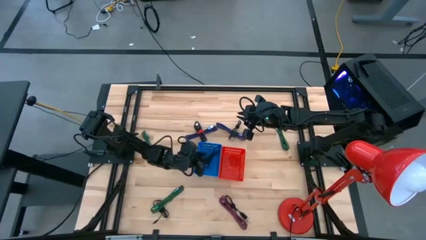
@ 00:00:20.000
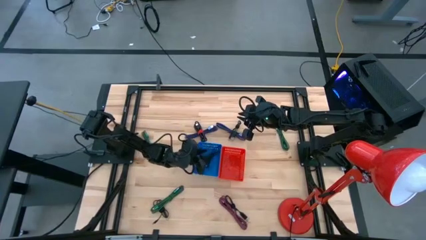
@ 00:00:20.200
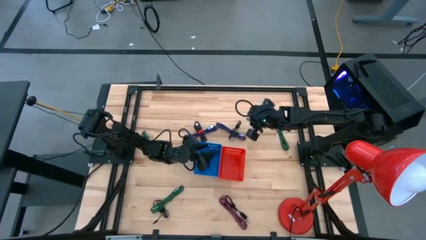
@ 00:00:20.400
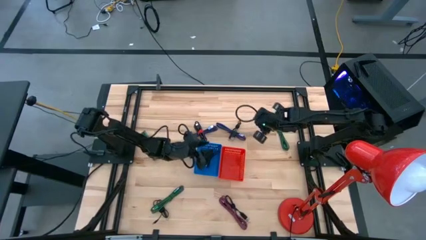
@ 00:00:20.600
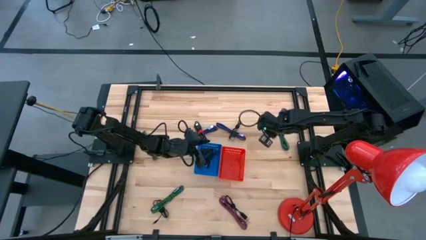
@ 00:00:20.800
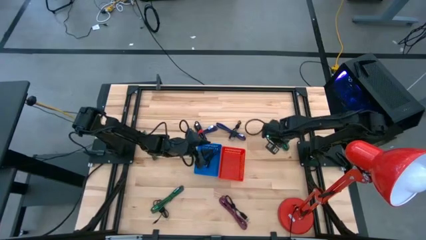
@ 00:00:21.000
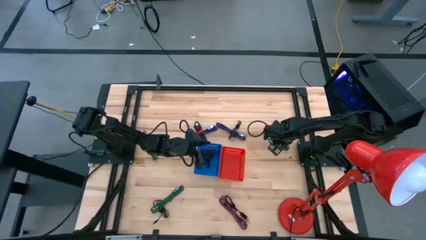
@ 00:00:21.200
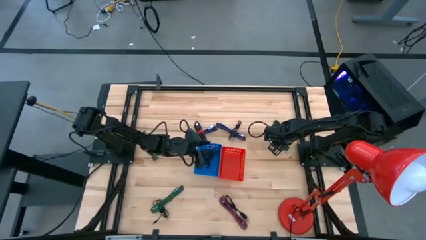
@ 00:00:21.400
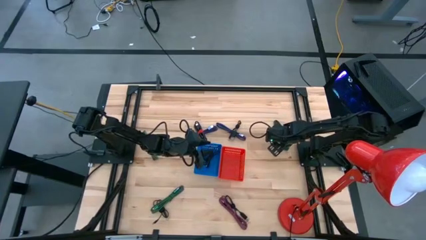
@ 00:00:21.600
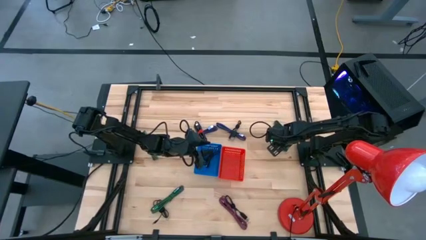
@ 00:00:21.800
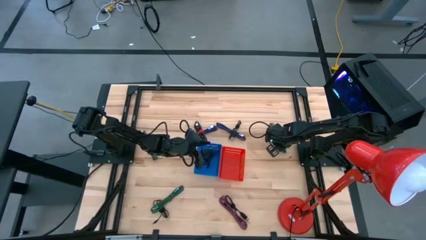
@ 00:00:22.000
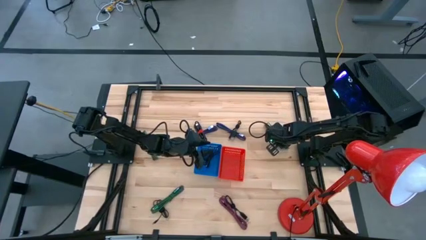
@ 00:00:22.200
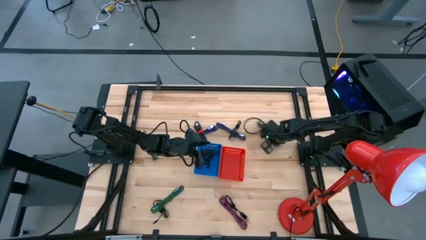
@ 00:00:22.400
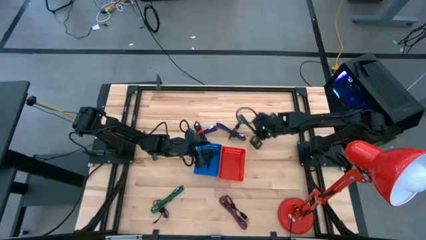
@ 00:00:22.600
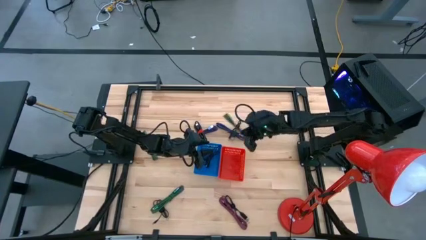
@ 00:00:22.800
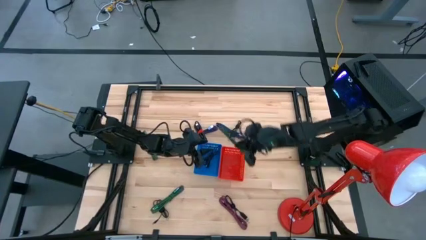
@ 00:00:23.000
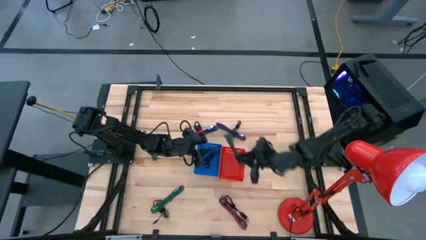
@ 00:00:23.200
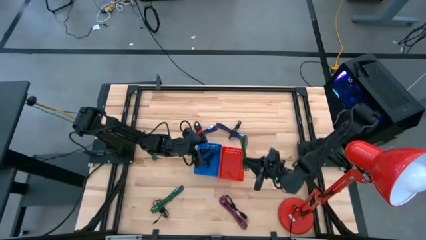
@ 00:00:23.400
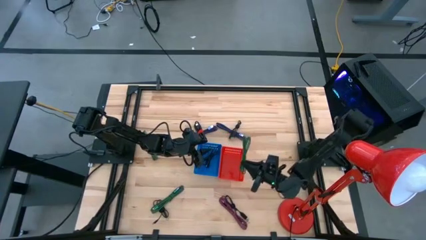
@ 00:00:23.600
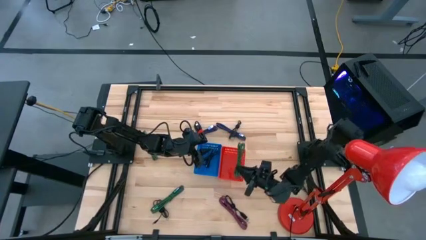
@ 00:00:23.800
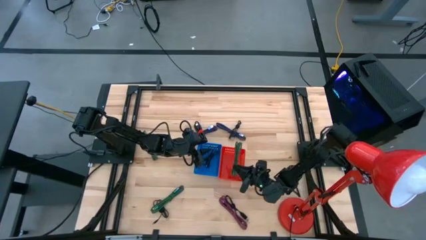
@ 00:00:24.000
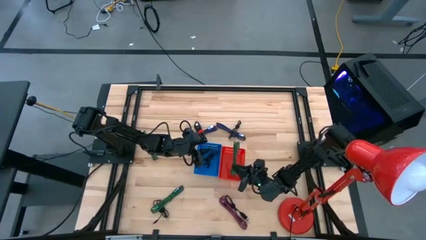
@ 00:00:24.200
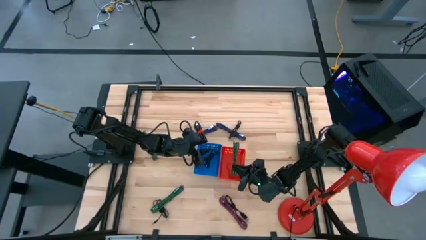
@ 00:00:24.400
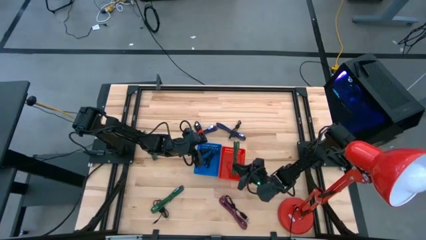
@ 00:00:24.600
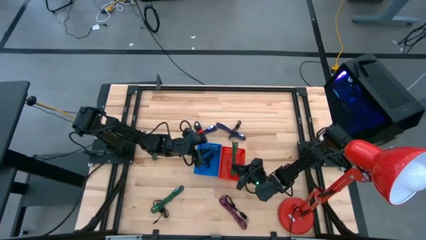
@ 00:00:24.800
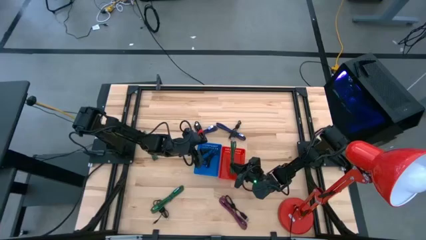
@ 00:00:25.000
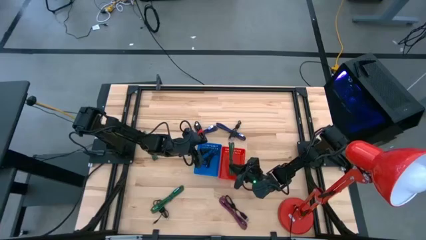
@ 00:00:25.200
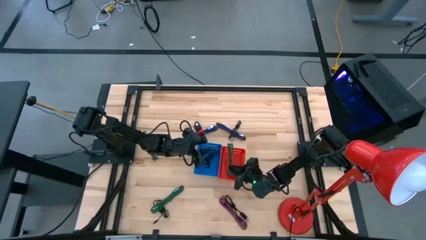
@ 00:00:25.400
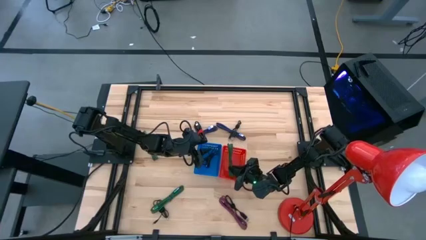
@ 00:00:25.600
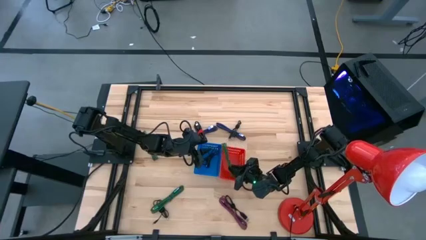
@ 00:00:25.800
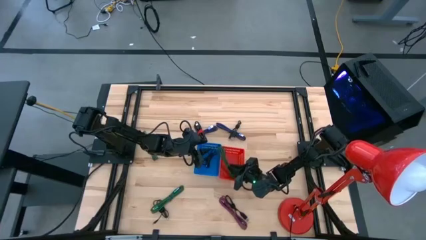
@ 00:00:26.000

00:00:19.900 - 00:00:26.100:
Task: Pick & Place USB Port
Put the black and green USB cable into the red basket

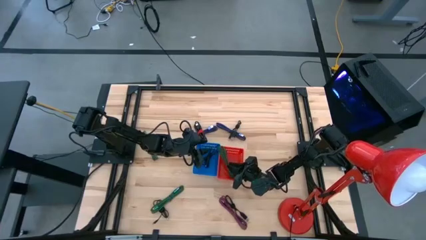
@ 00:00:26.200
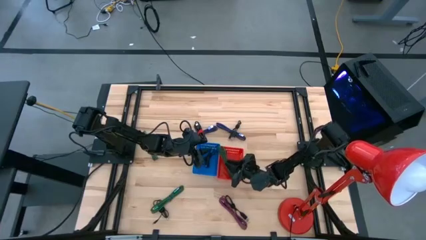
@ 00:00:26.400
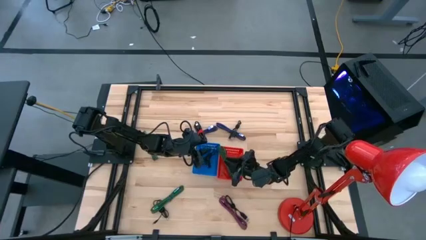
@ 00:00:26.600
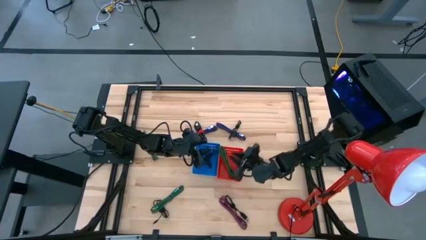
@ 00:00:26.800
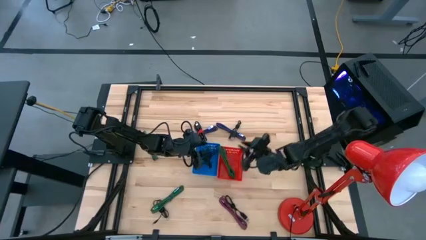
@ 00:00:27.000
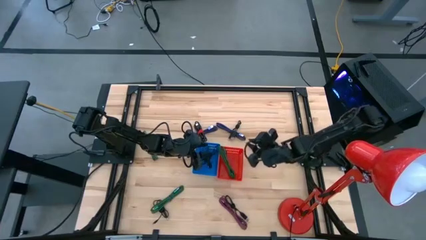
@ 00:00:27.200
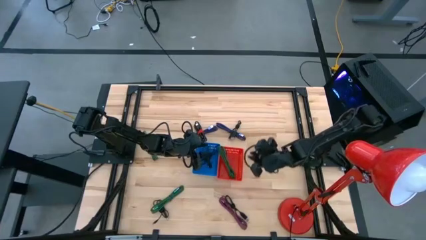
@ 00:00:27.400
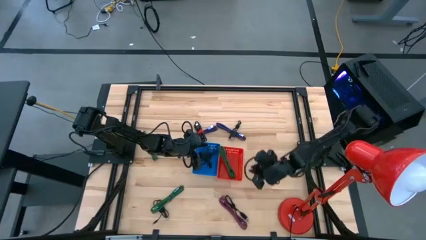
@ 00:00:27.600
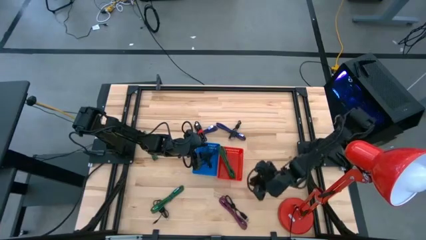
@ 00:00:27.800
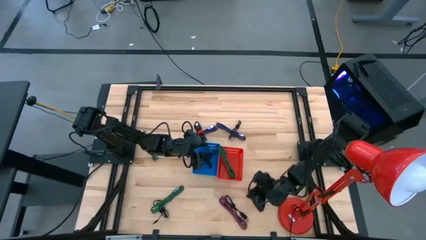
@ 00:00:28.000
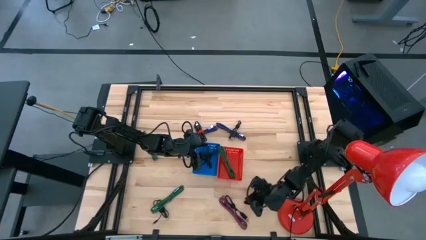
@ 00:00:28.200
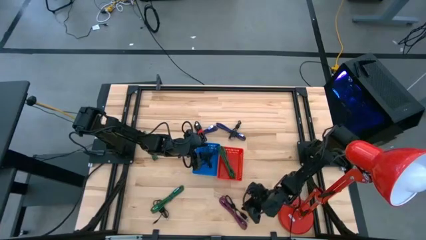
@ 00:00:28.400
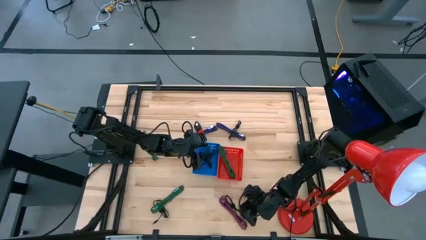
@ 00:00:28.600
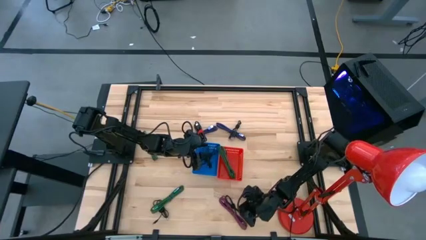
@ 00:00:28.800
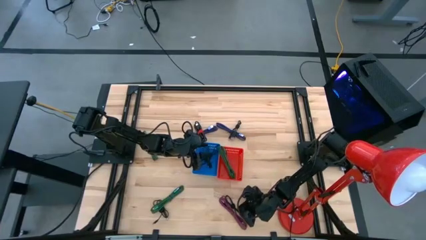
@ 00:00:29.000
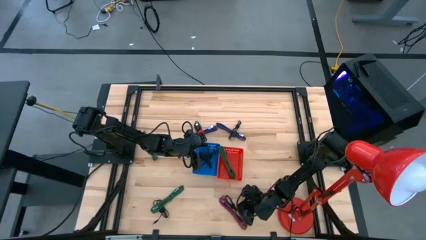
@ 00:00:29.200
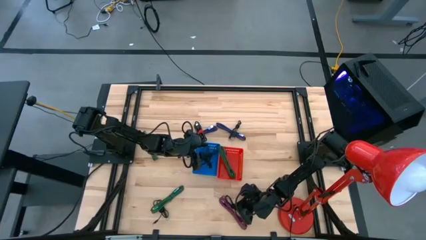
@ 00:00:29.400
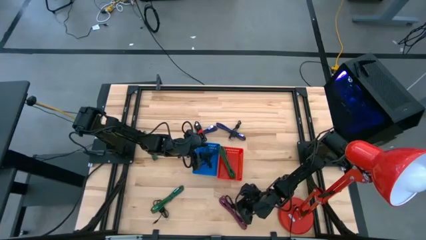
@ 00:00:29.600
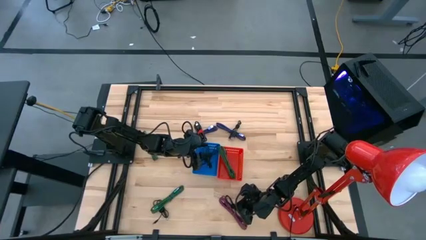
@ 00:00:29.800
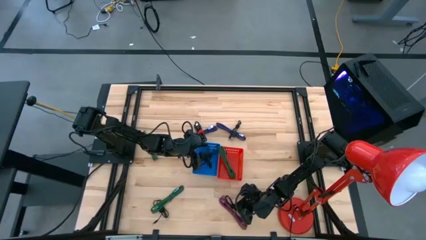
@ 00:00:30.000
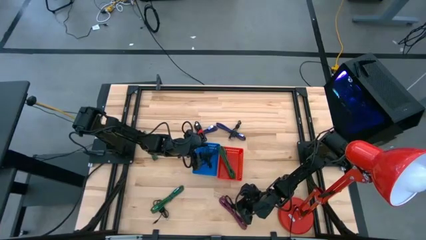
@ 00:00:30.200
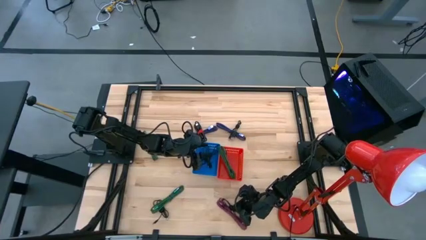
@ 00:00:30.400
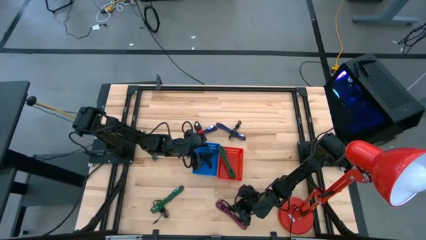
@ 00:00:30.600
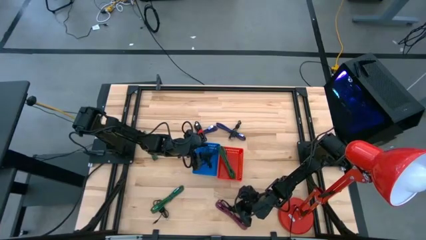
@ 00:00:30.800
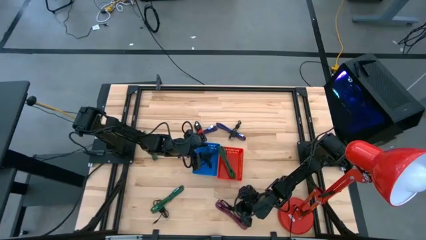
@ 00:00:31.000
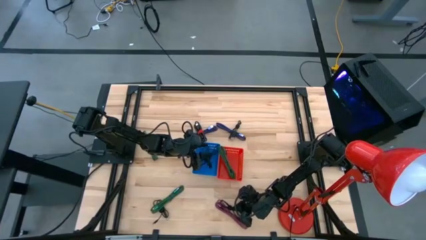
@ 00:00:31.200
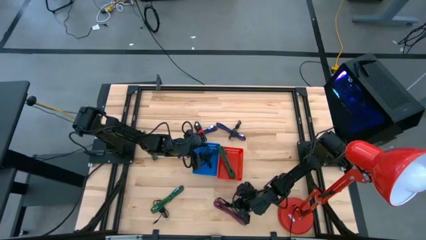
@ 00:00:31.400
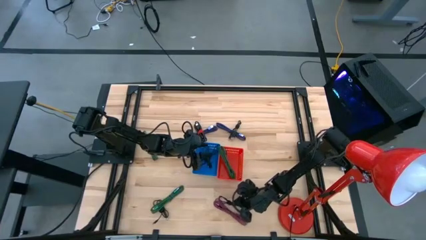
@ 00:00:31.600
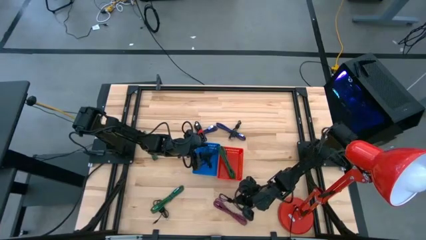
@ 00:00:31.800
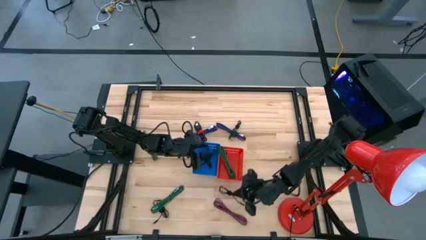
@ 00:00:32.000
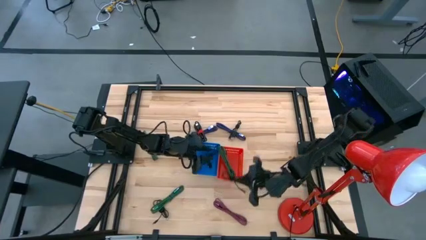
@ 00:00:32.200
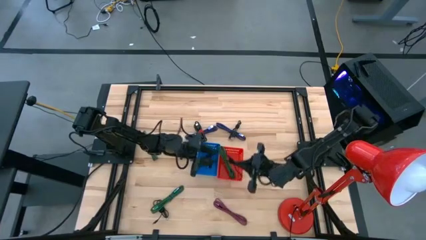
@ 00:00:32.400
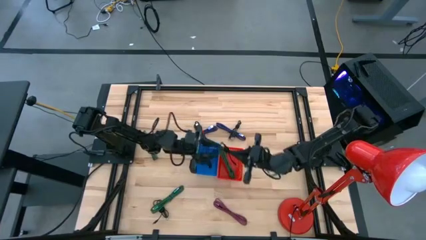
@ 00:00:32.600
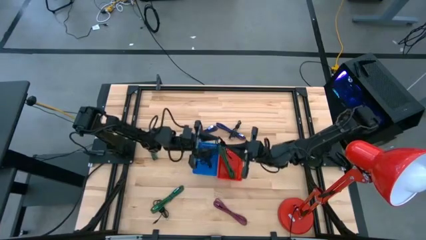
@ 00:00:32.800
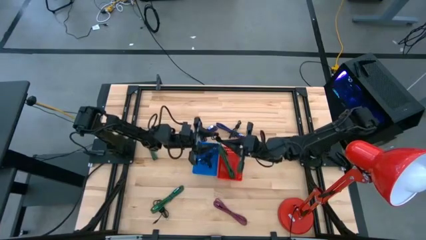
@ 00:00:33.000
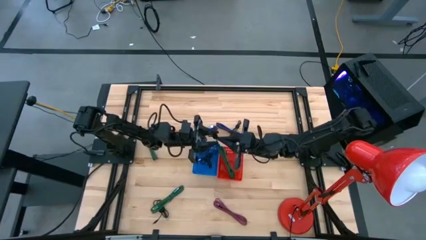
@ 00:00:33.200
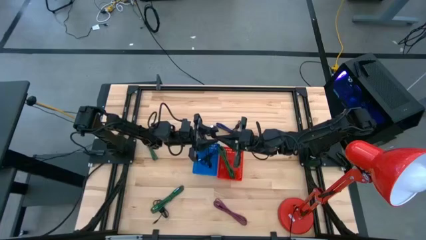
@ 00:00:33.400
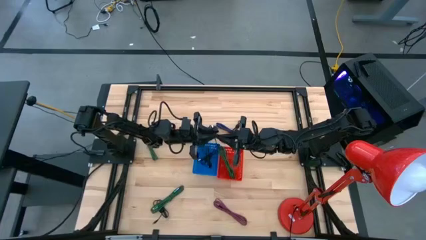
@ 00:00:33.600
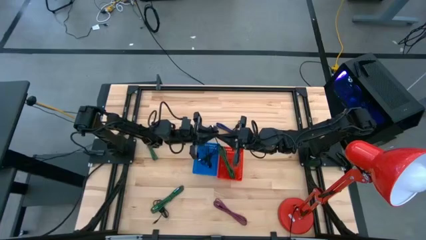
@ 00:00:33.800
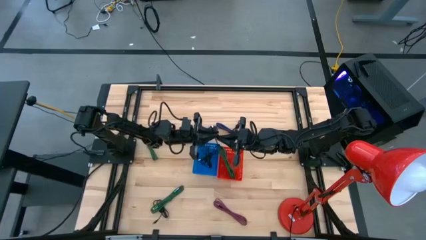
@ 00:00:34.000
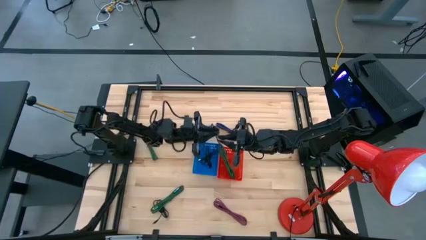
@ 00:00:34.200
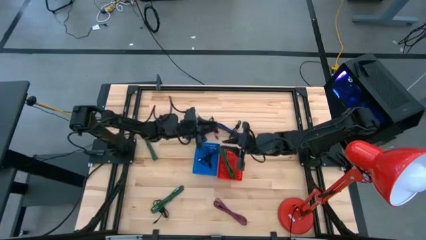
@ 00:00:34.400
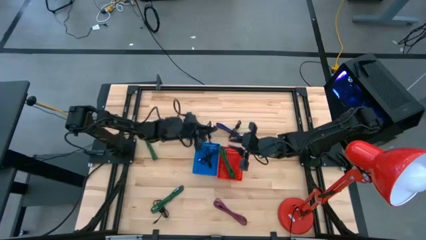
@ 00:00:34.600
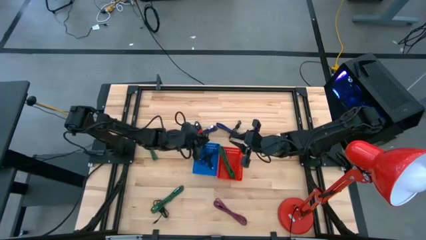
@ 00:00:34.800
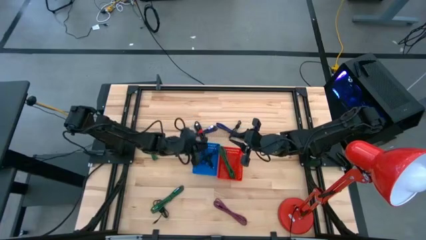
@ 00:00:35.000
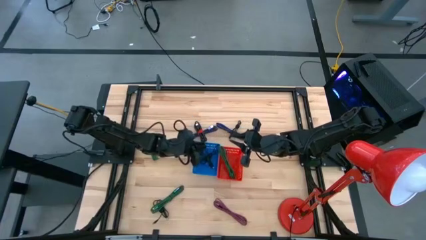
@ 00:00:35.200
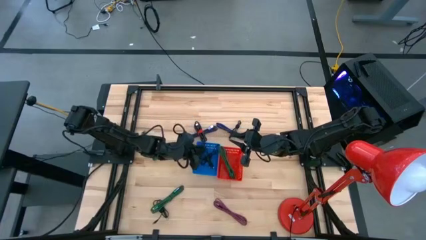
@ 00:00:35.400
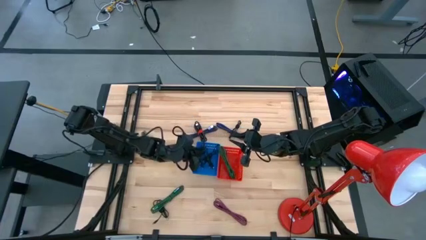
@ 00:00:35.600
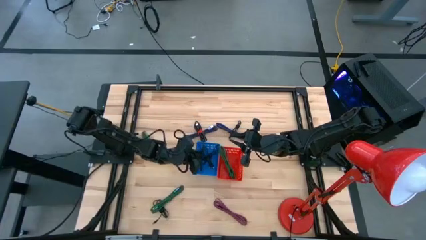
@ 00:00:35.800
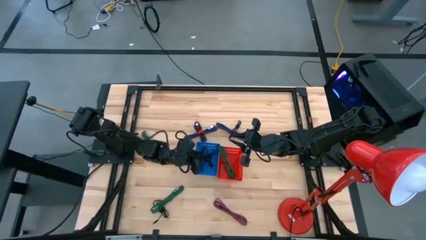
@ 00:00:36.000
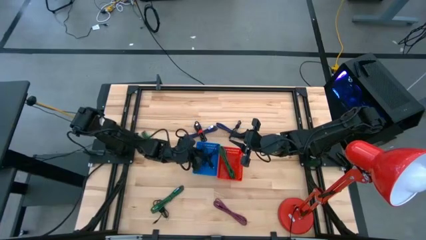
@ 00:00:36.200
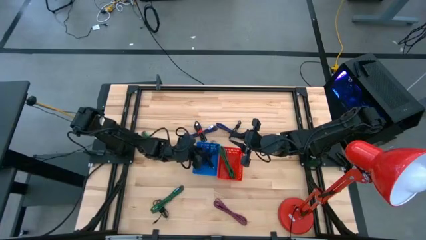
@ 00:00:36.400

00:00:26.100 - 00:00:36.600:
Put the black USB cable into the blue basket
